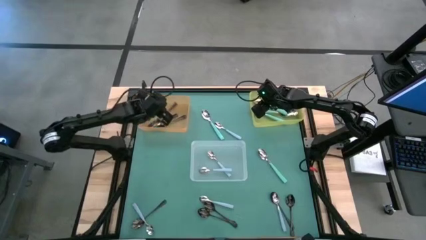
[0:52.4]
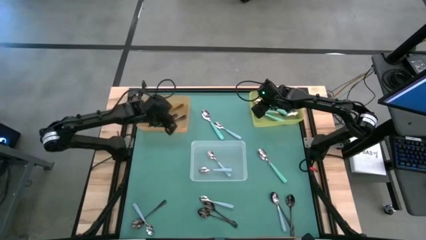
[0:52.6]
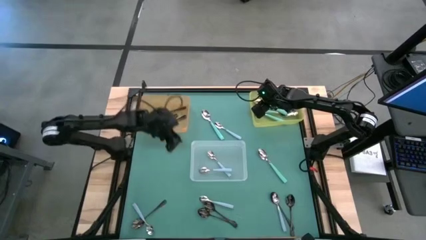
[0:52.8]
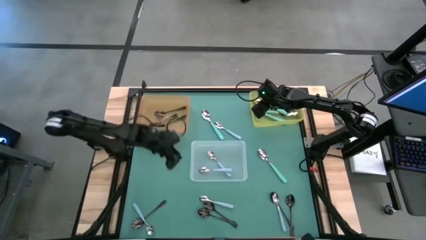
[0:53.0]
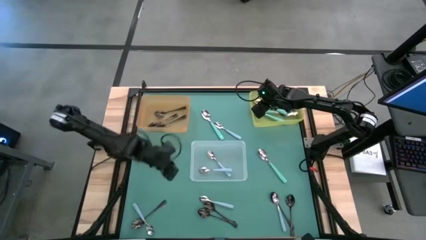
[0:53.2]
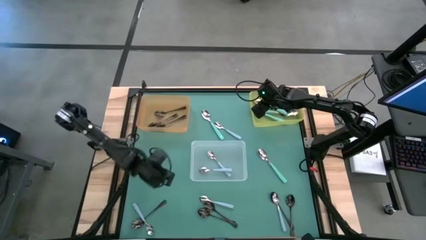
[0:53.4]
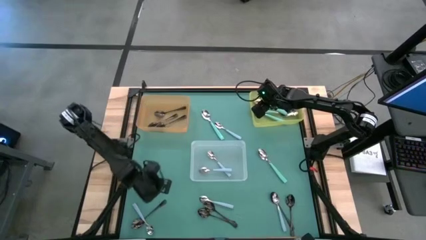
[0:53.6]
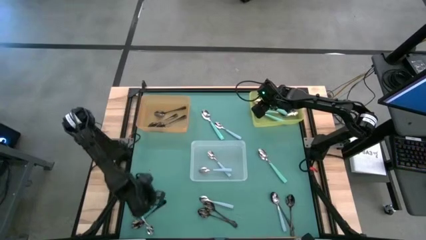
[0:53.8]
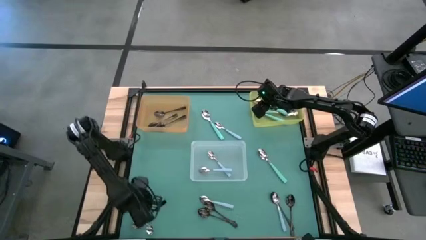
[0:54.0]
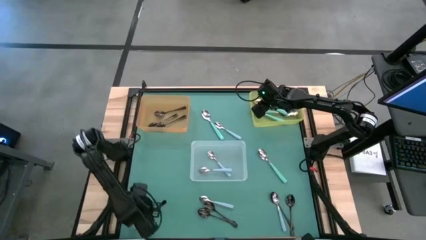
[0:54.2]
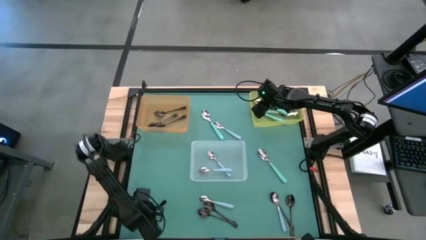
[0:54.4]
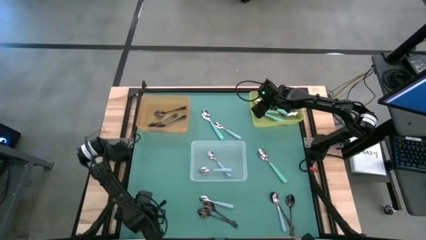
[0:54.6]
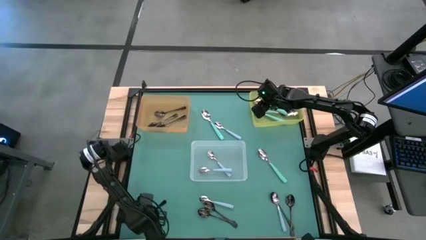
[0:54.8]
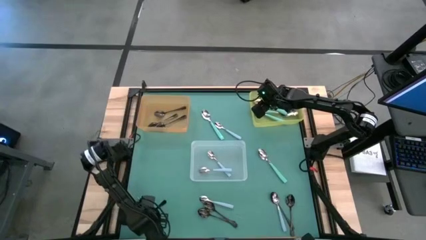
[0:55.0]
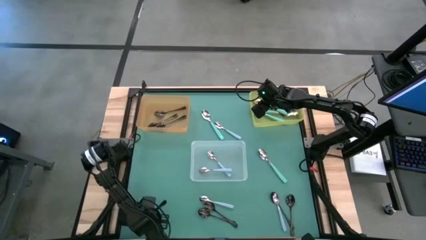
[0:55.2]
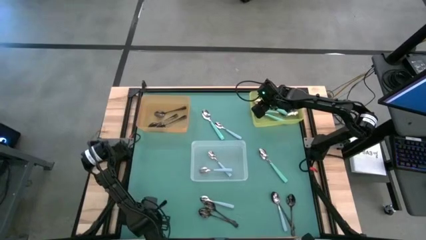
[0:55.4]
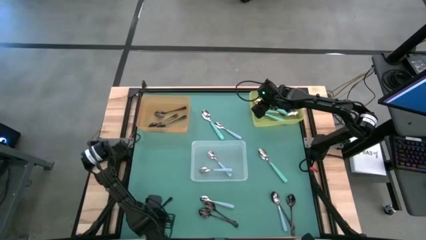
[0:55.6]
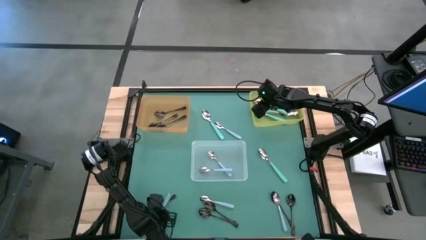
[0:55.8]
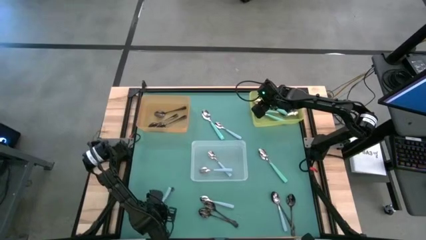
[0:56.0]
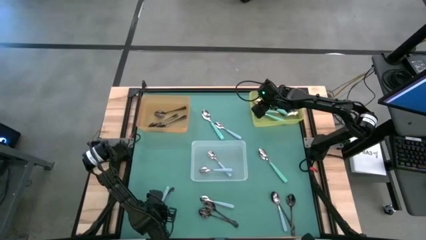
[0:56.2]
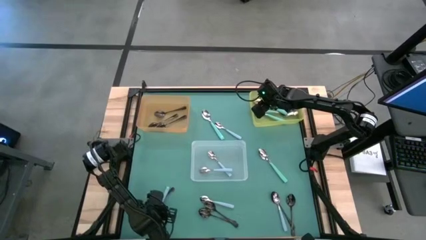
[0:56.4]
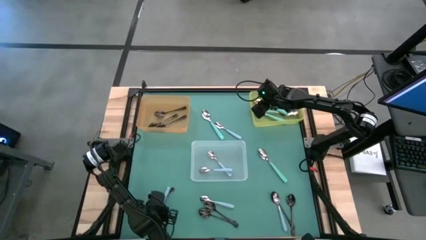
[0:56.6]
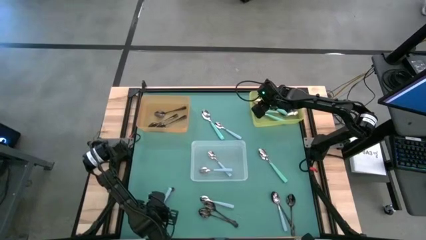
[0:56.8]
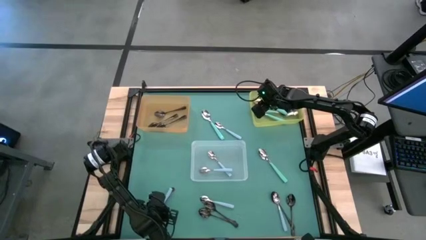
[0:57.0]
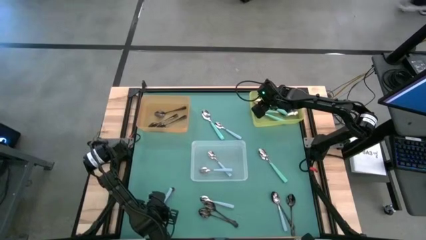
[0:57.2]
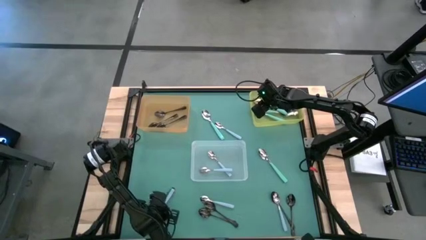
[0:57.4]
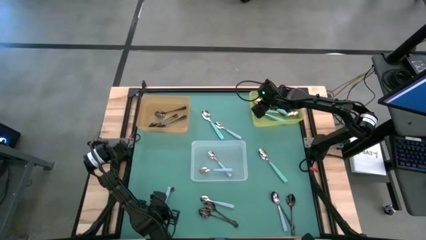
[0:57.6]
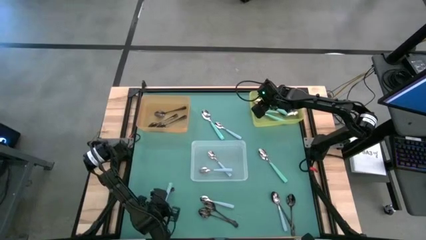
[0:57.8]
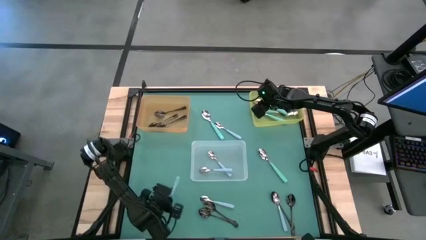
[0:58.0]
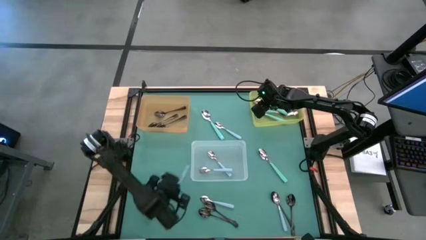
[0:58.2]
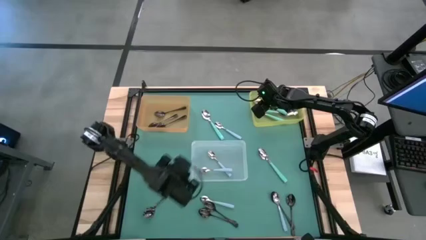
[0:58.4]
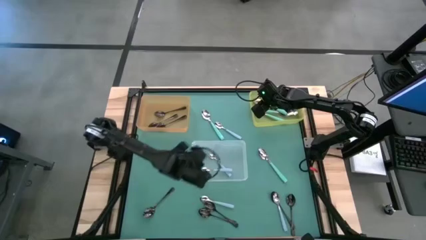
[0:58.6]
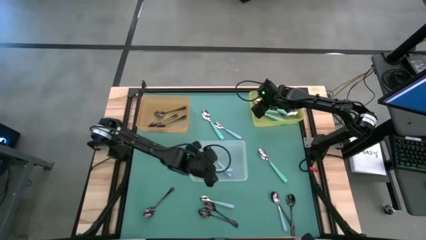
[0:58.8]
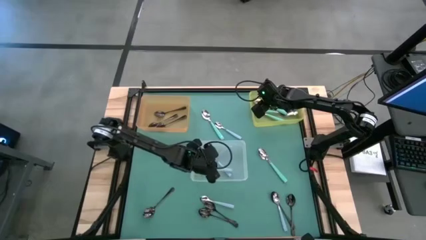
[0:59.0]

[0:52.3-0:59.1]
Task: Sort silverware by color (type)
Put the blue spoon into the white bin

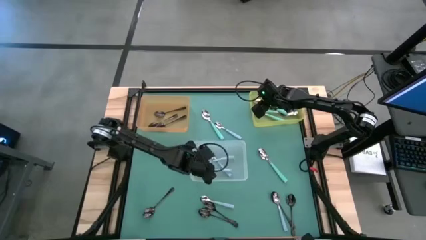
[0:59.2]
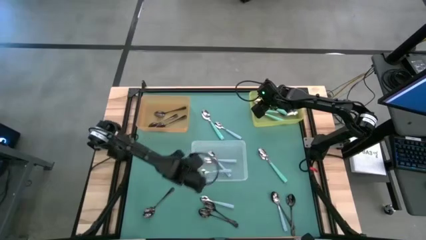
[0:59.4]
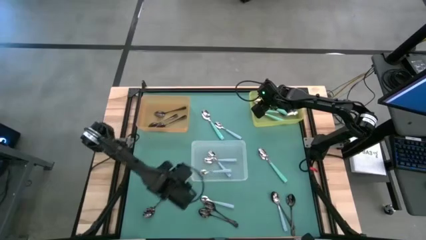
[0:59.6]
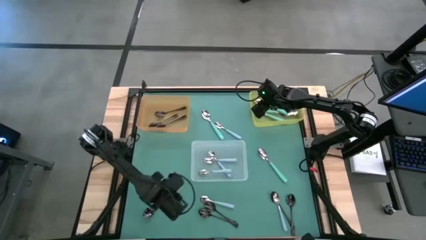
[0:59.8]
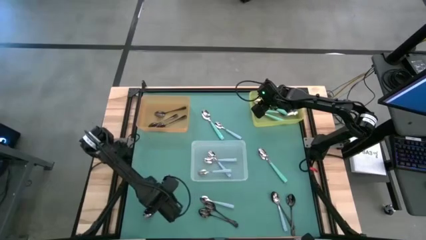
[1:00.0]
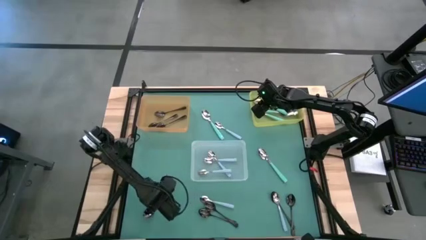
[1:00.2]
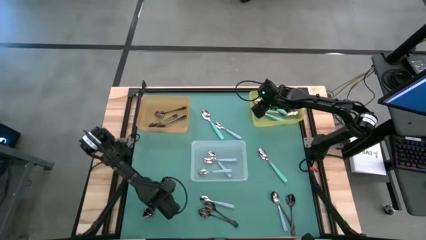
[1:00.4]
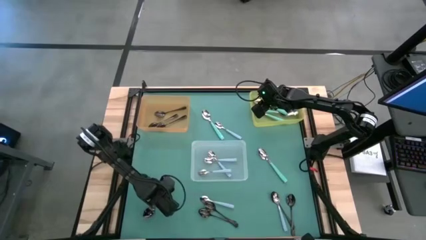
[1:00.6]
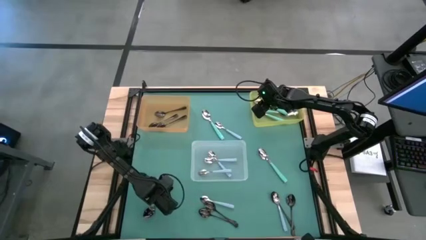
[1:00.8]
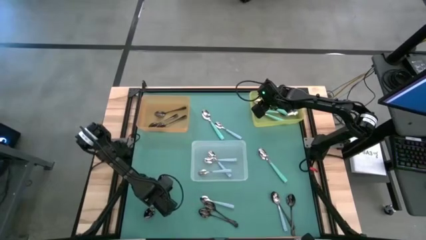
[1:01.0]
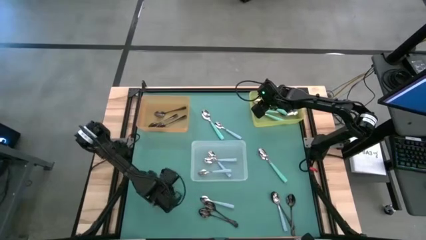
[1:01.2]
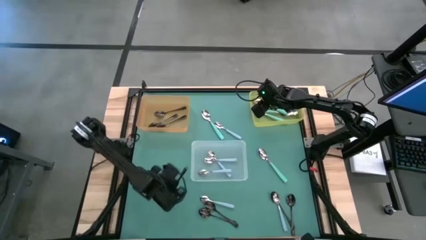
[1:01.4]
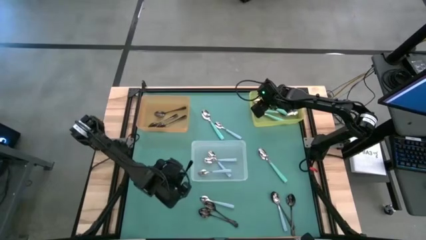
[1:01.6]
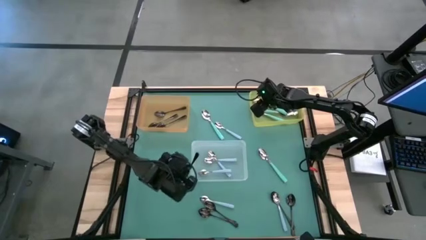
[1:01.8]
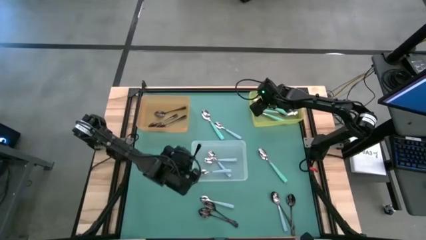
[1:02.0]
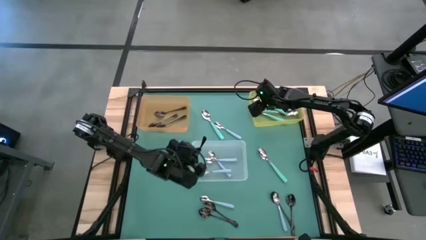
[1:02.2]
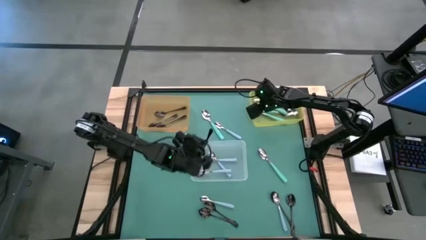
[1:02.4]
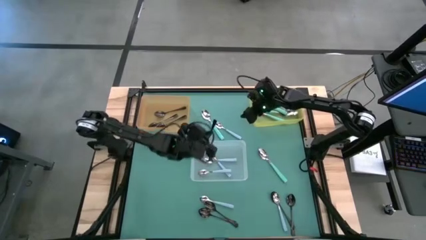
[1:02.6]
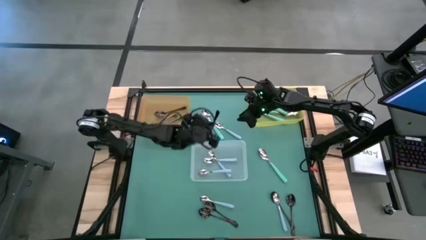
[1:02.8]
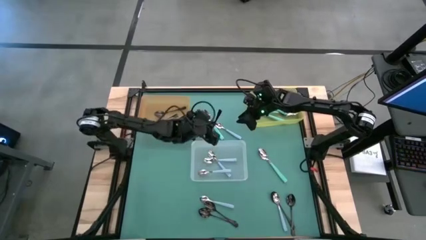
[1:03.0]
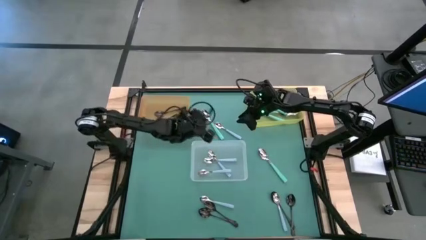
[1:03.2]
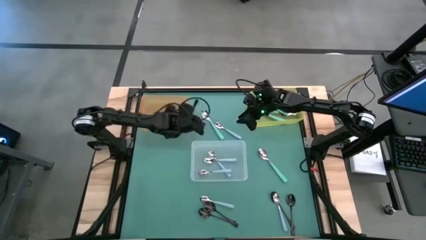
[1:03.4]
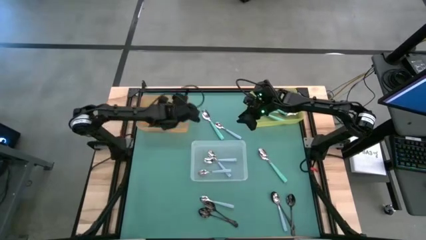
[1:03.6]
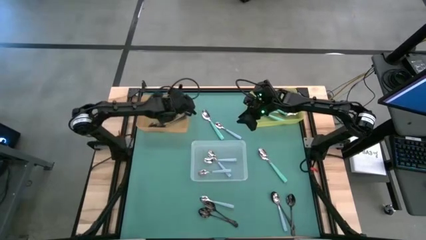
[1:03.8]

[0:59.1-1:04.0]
Put the black spoon into the orange bin

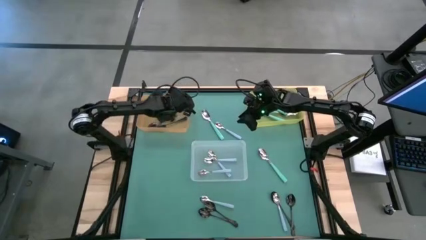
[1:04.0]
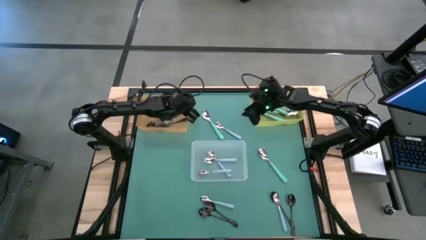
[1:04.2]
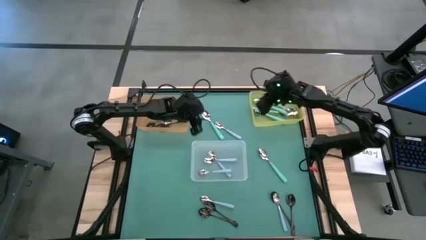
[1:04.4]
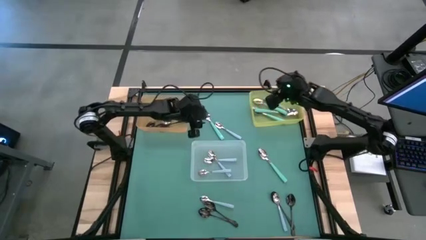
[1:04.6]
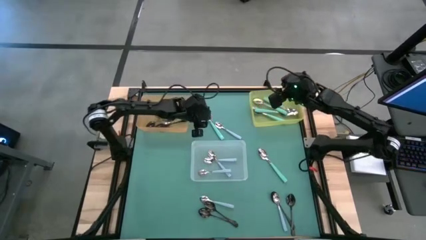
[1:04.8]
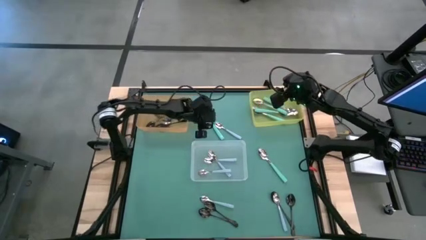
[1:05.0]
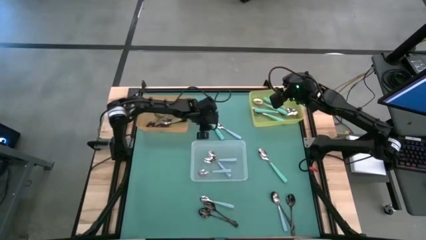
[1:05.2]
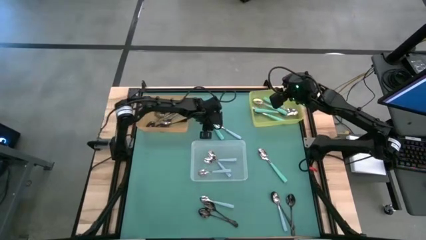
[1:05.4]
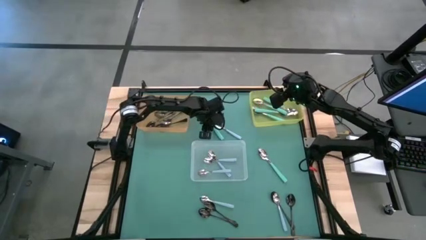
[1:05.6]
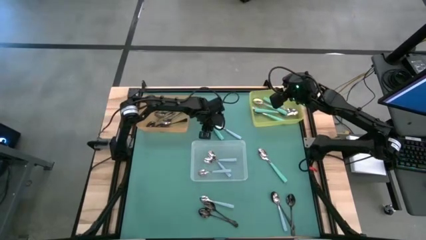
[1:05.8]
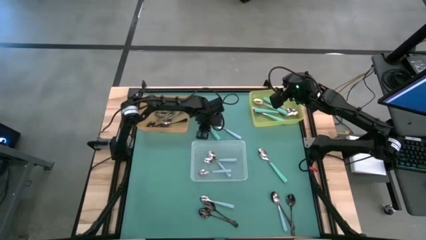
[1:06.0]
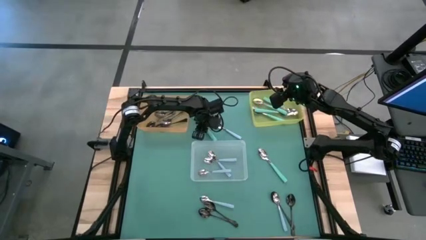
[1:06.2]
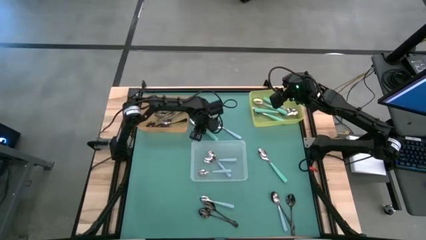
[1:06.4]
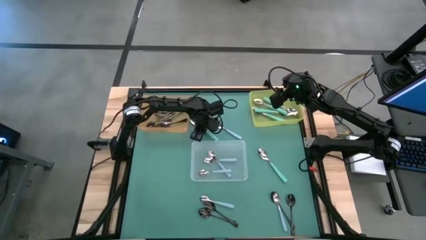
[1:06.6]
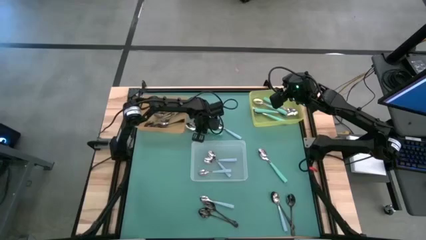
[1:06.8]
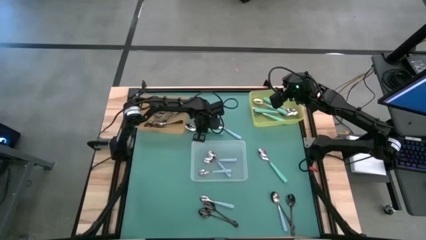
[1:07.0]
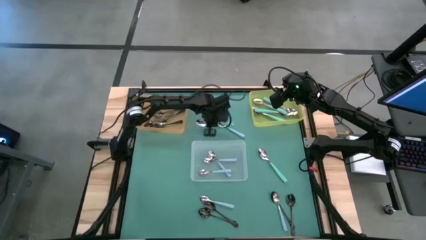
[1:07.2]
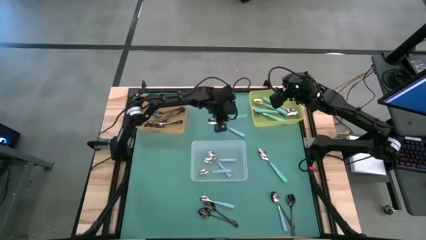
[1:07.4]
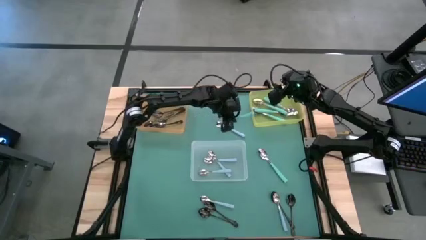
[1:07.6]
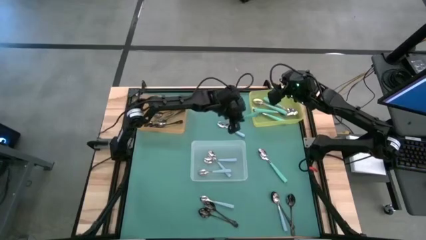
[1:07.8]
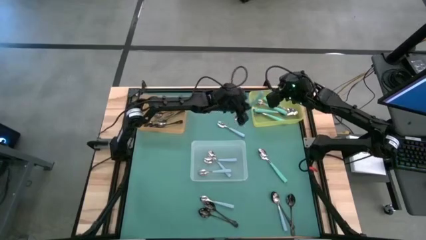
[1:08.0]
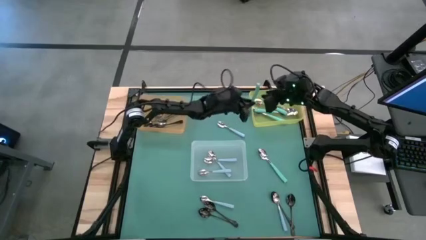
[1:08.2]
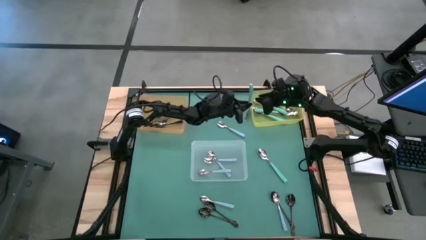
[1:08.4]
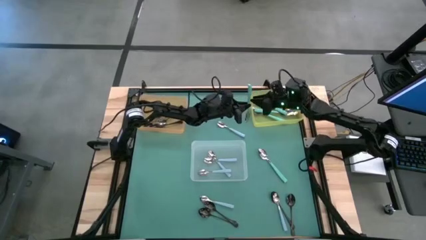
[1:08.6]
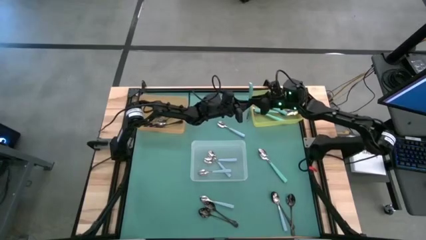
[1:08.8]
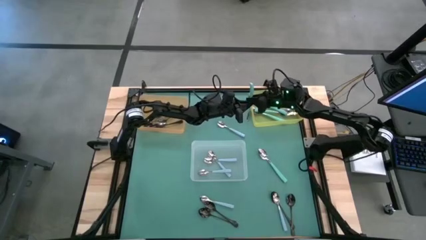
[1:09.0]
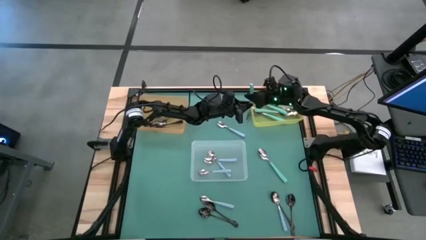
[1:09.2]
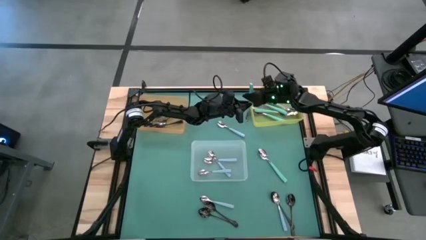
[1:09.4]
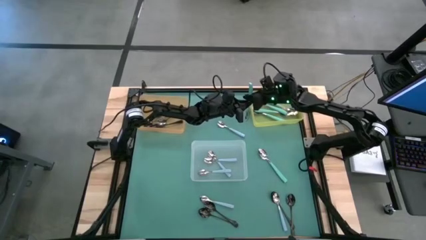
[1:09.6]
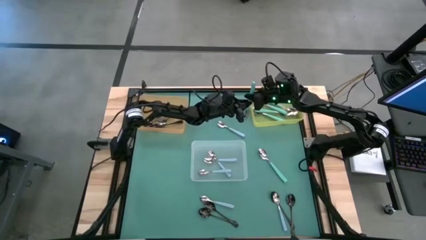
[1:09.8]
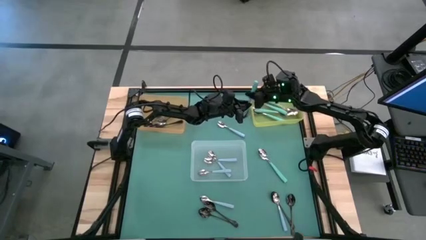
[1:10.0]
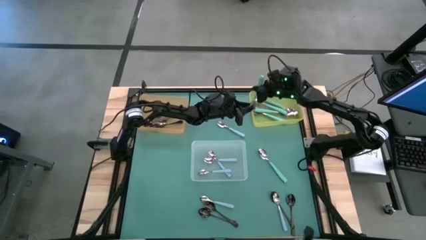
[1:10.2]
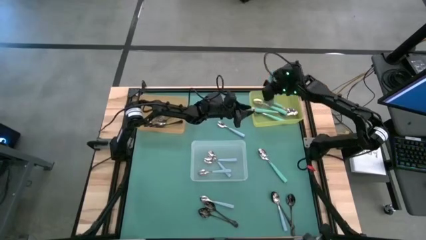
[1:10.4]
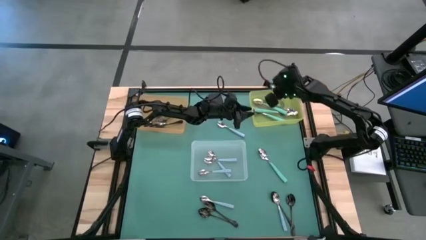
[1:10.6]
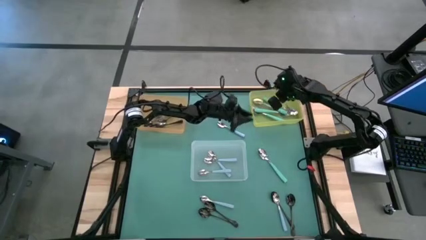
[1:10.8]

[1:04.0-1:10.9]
Put the light blue spoon into the yellow bin
